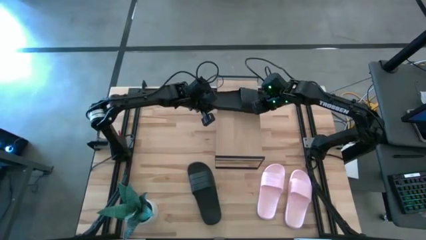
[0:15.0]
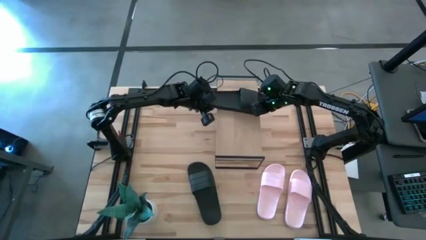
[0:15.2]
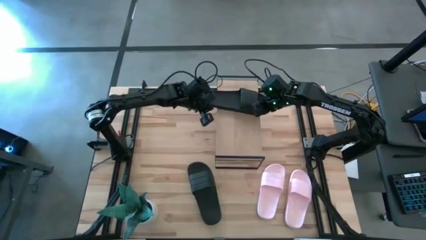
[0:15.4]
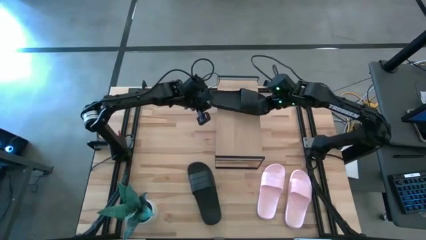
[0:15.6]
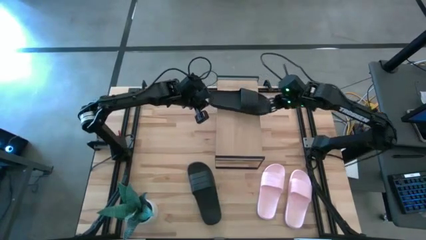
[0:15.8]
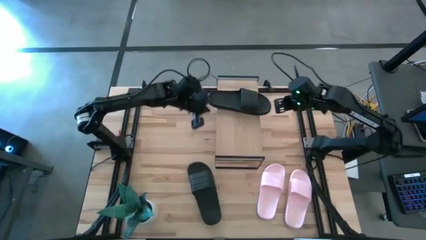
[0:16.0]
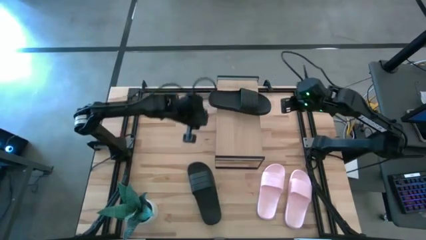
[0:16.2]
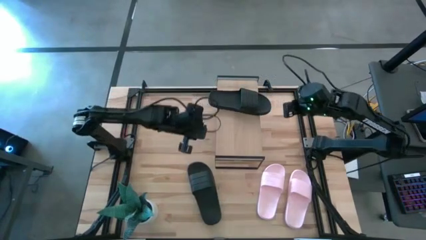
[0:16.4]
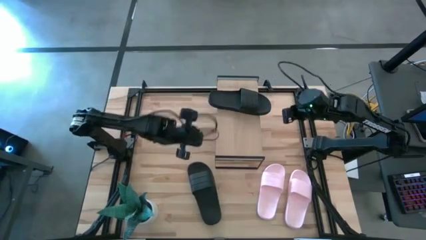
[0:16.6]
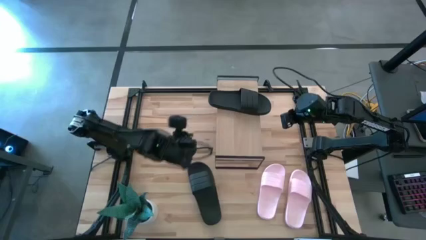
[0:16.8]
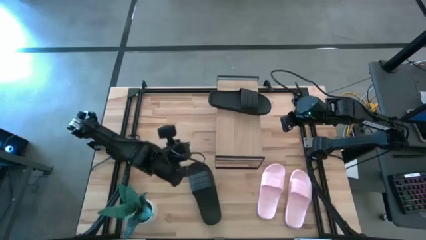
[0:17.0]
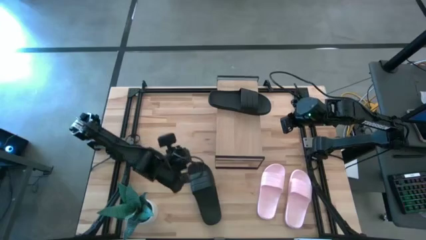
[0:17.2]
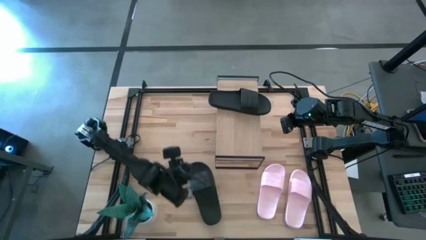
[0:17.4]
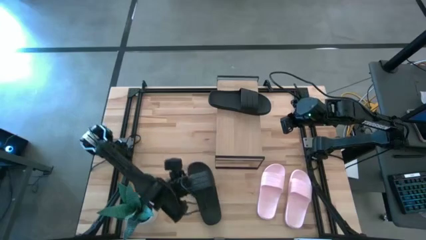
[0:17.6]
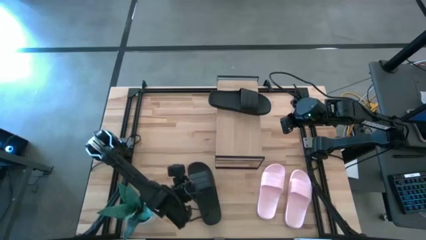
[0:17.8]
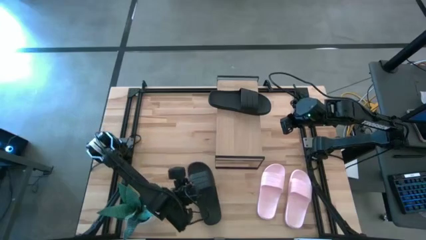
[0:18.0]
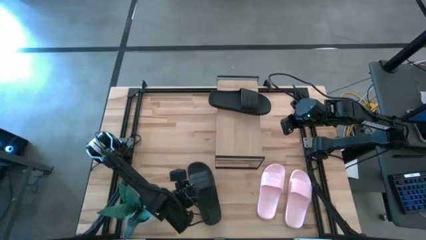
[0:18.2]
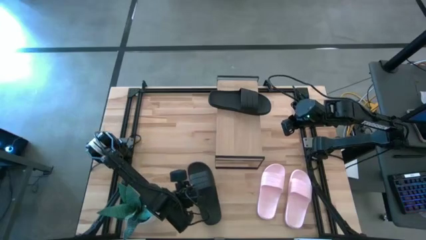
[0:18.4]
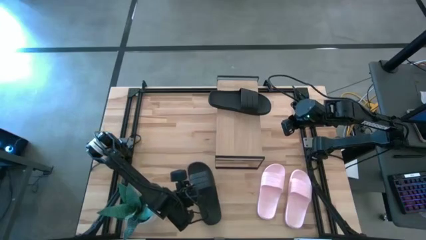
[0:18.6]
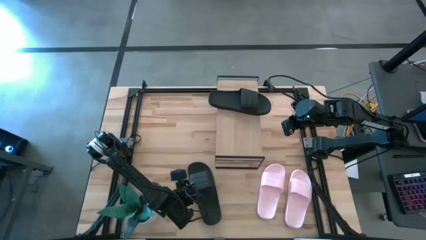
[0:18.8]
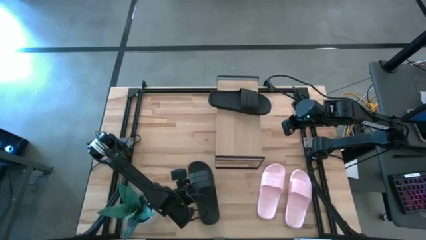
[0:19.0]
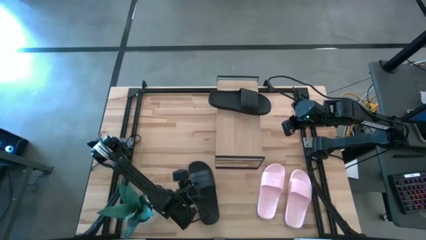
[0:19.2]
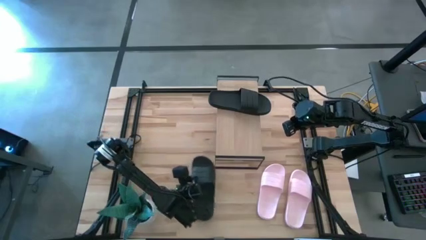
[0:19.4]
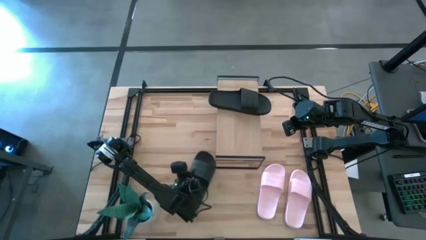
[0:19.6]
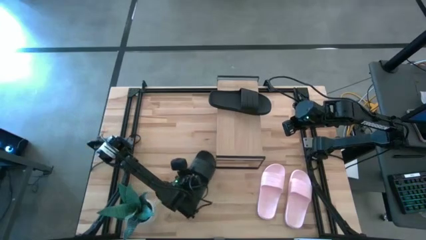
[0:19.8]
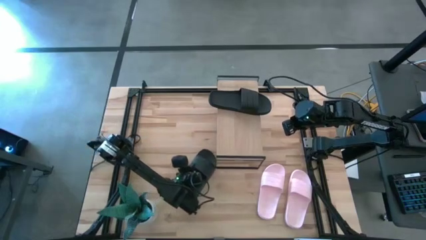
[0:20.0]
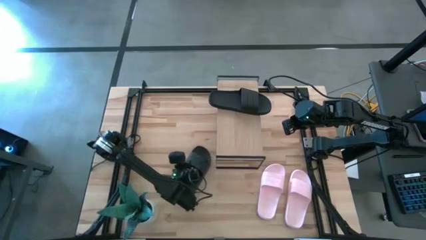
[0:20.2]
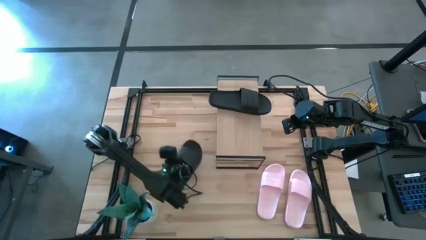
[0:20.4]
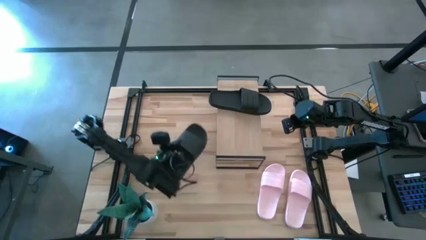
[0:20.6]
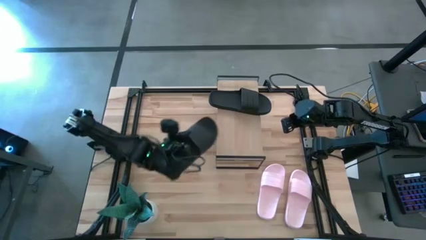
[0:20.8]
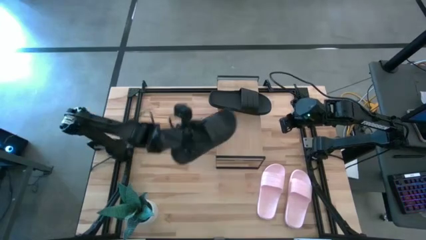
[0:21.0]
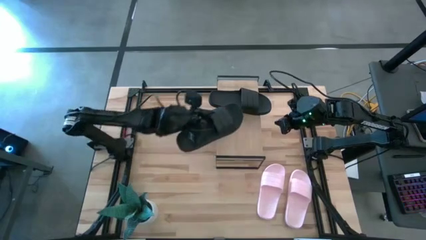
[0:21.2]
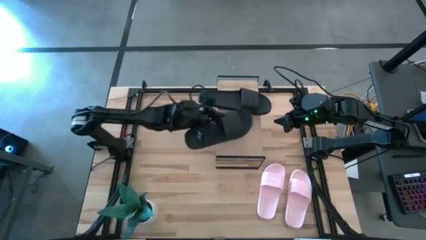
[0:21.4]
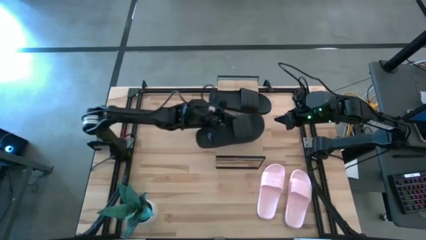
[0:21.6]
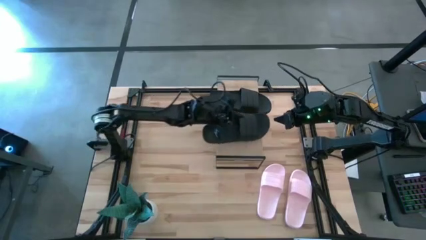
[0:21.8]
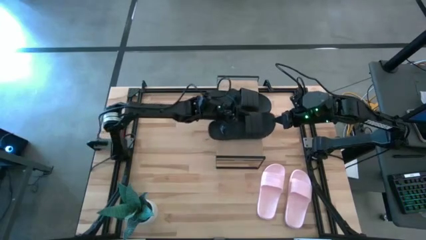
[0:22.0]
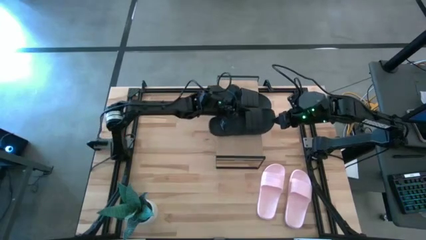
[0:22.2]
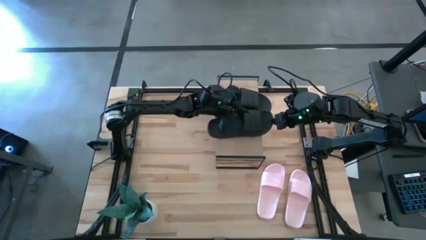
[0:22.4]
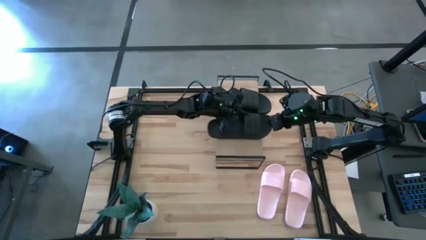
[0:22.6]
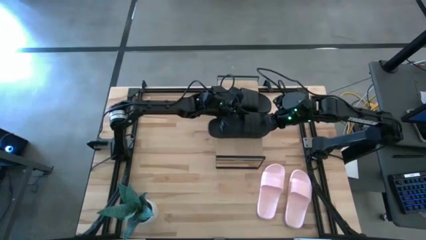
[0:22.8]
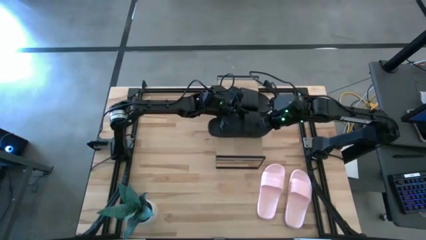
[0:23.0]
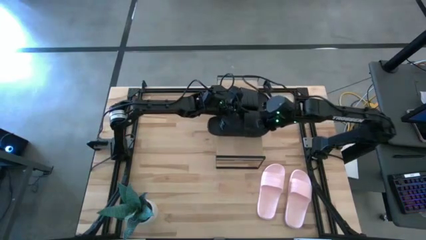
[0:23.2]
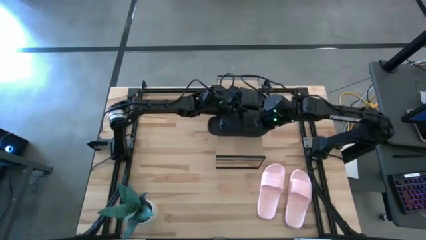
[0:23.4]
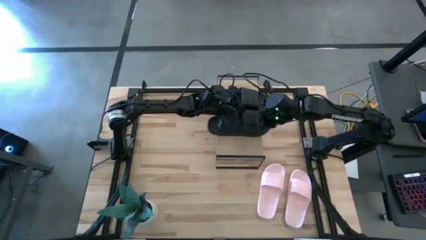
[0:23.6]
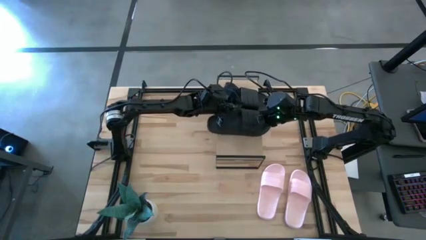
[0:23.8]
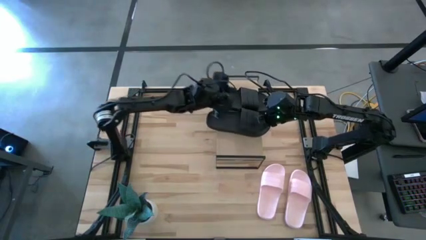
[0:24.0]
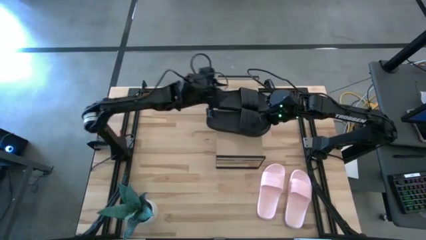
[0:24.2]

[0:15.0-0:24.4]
Task: Pick and place slides into the shelf
Put the black slide on the shelf

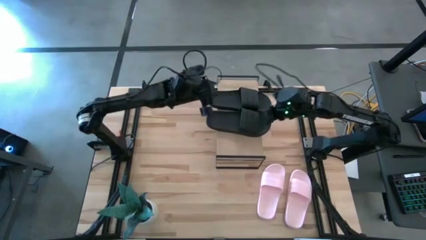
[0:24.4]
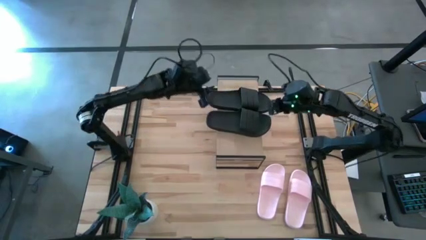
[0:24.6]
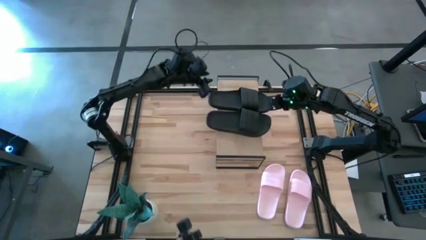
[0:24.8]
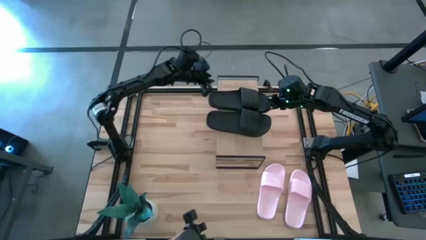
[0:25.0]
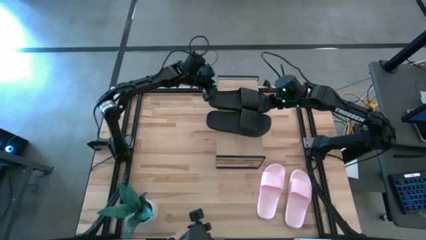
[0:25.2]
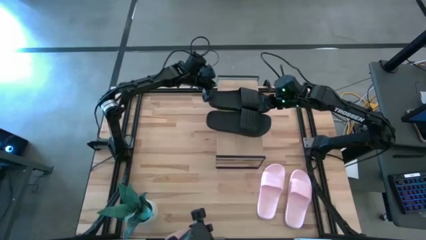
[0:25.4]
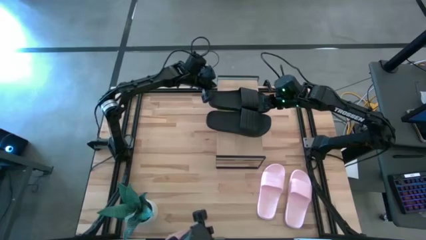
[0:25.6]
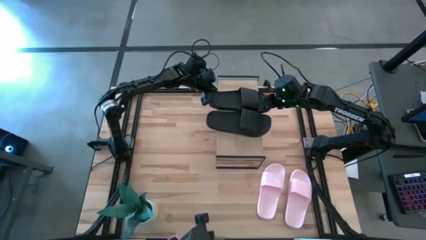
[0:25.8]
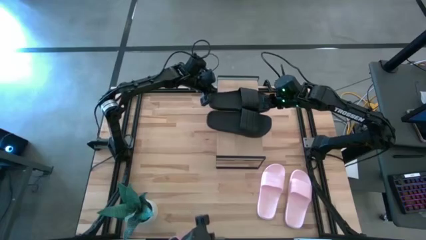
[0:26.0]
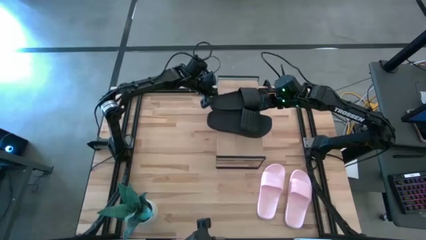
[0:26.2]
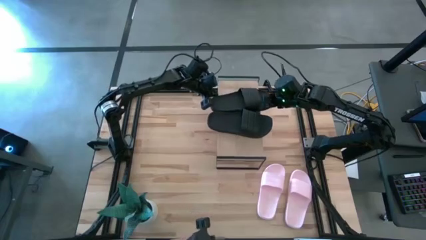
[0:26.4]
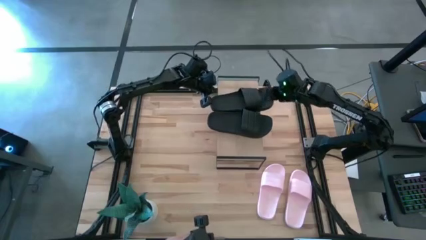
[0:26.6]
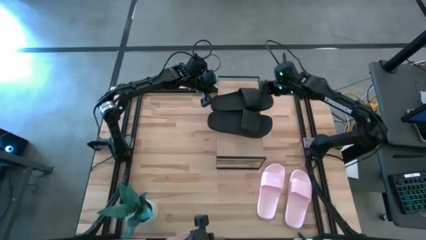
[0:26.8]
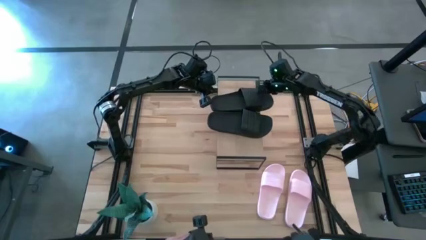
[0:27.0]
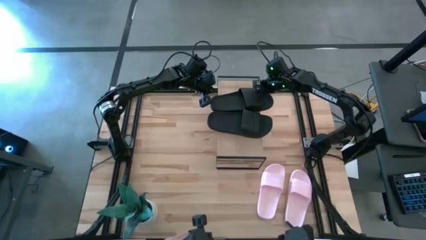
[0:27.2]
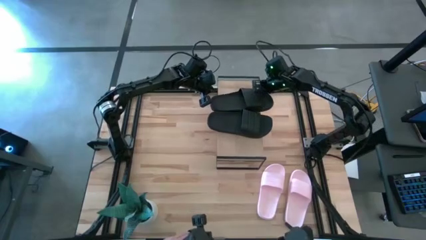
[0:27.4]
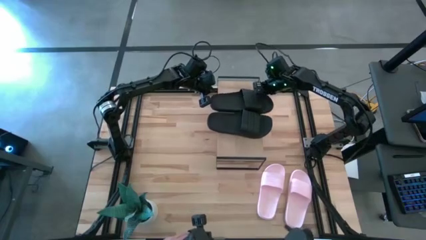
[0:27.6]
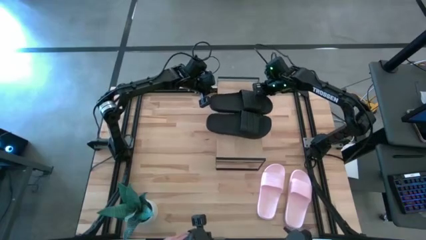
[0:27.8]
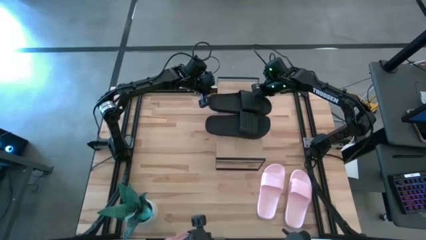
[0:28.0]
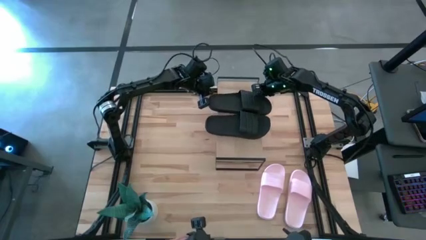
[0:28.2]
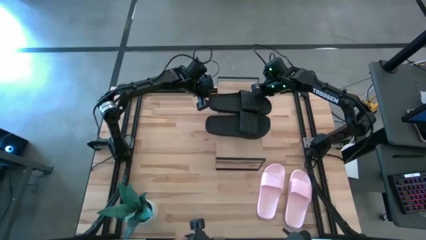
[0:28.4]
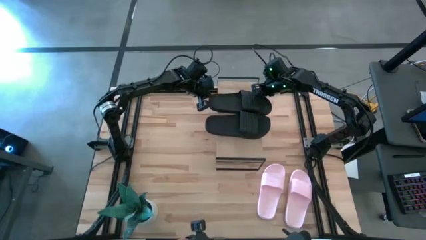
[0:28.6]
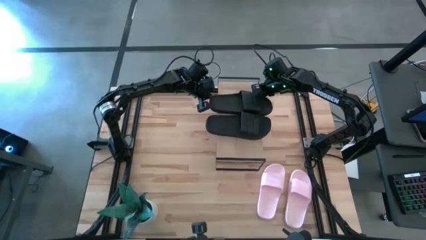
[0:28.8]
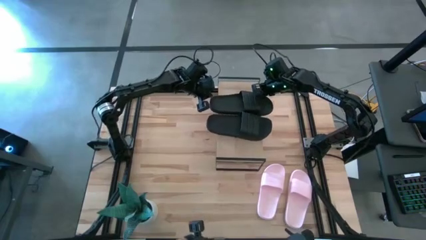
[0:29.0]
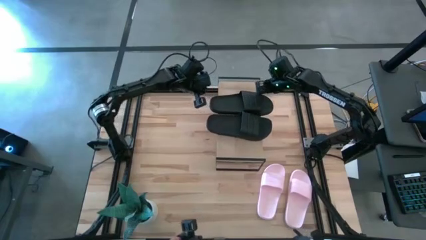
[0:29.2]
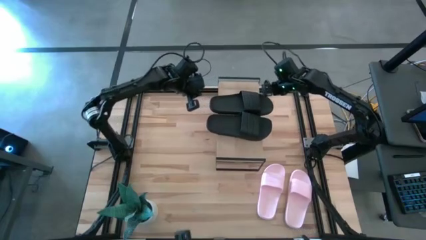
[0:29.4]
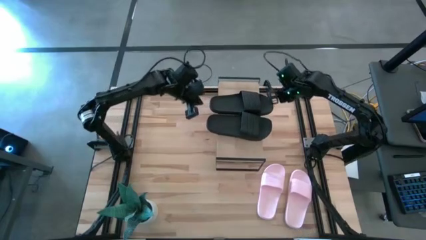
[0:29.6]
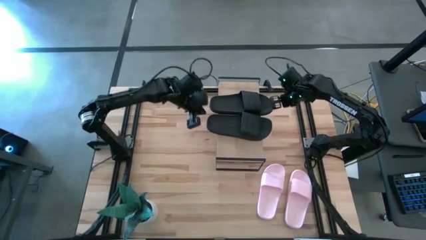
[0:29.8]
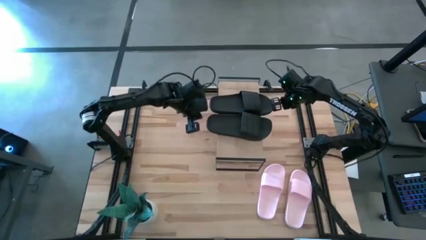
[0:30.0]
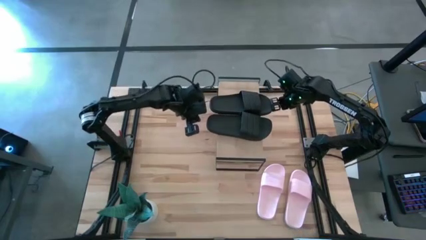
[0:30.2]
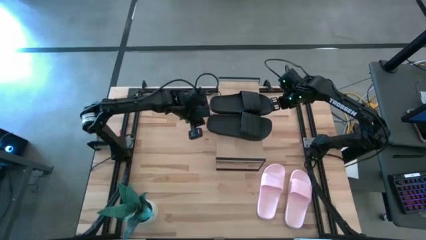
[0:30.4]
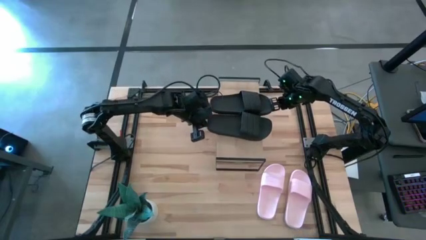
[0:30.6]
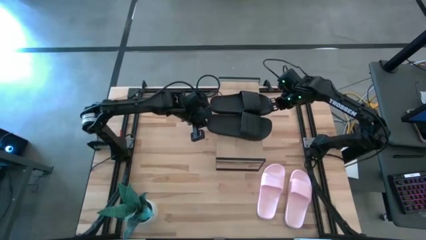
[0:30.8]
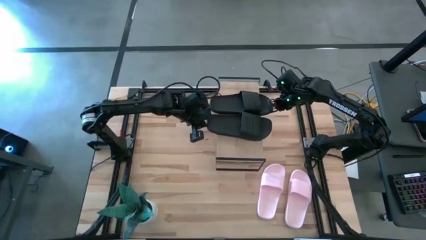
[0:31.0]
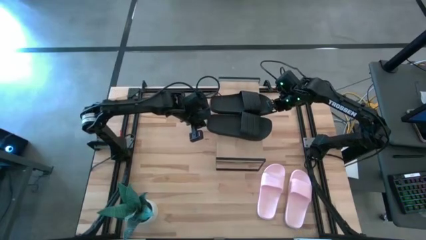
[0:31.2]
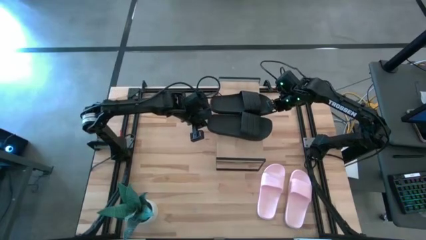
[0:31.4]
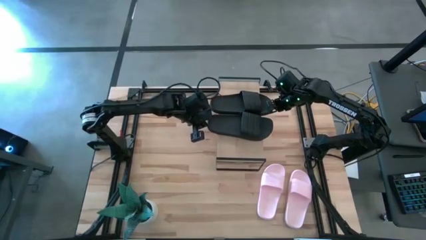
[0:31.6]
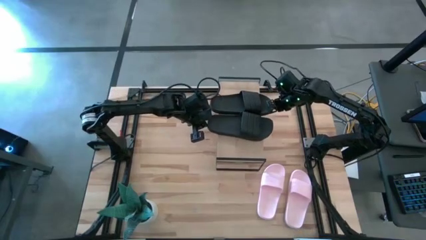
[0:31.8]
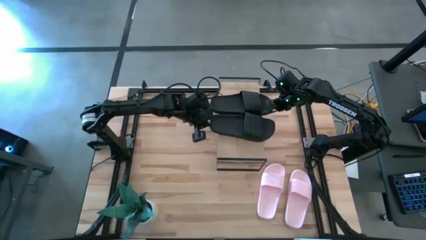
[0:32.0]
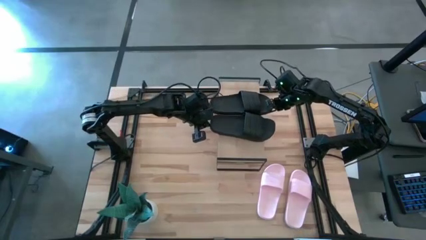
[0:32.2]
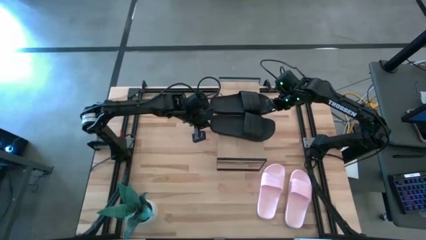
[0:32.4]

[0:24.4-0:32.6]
Adjust the black slides on the shelf
